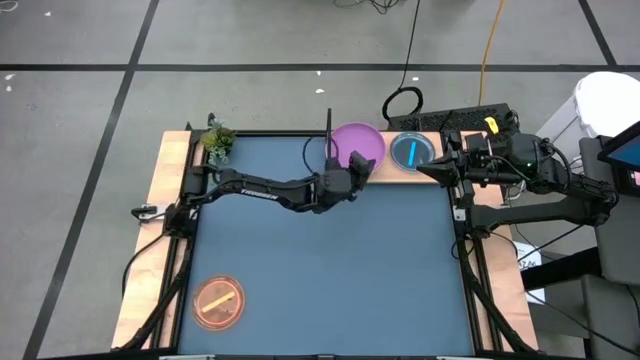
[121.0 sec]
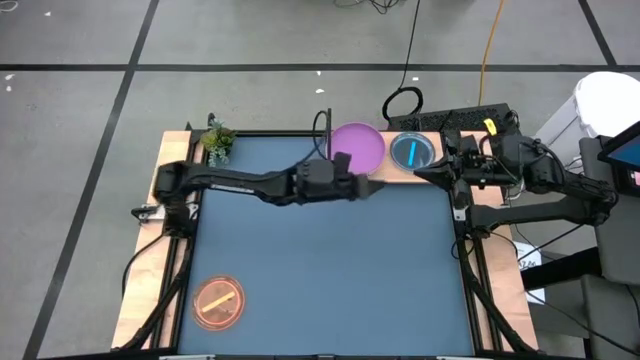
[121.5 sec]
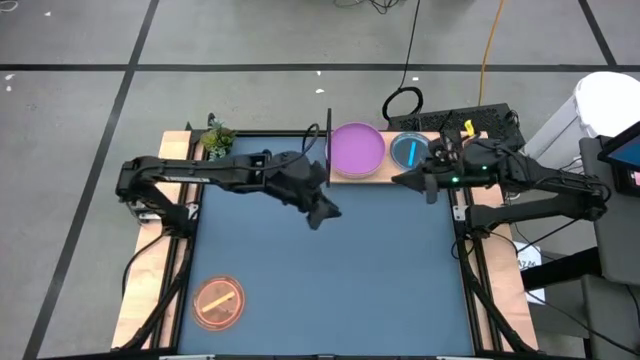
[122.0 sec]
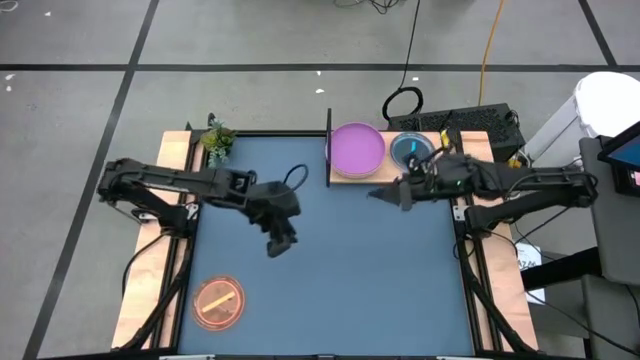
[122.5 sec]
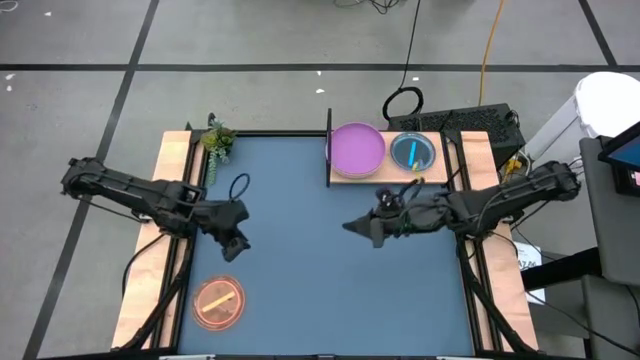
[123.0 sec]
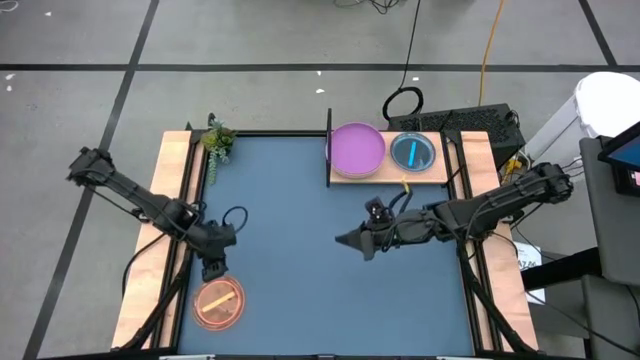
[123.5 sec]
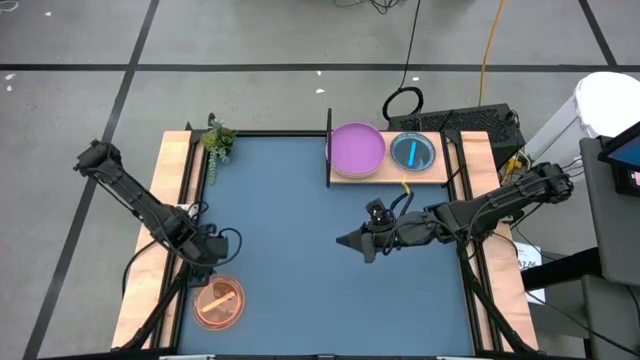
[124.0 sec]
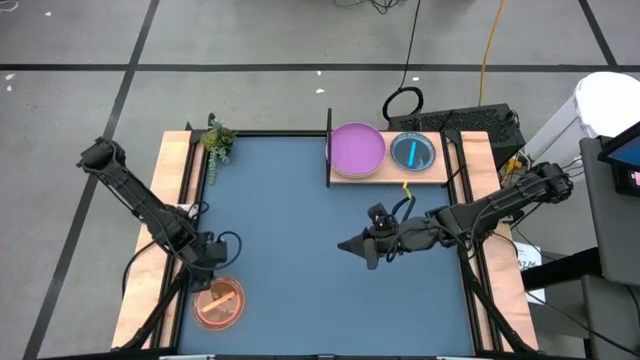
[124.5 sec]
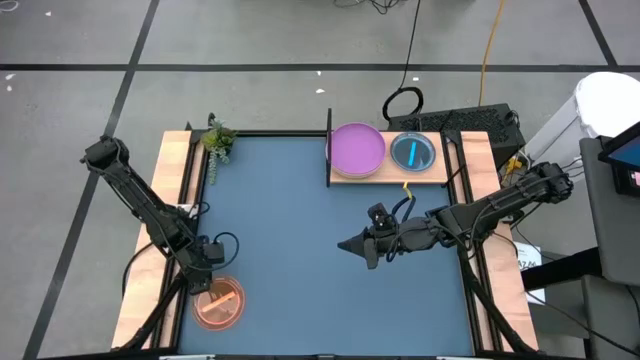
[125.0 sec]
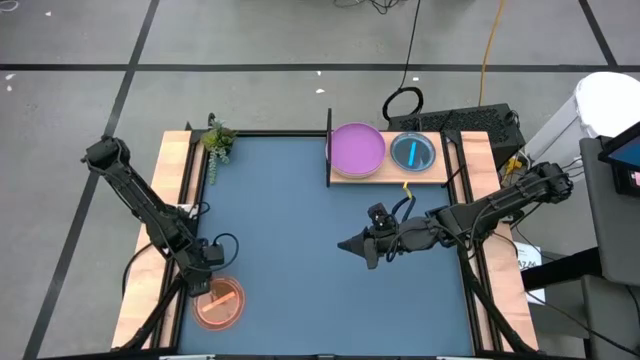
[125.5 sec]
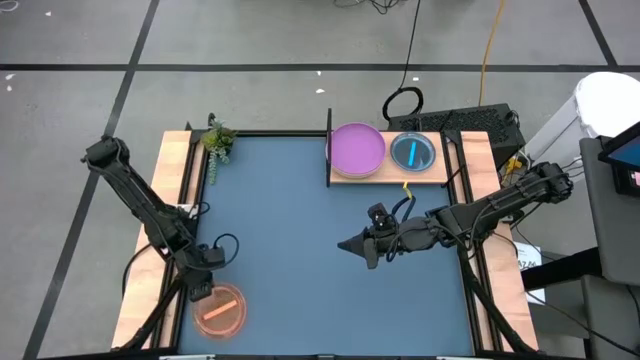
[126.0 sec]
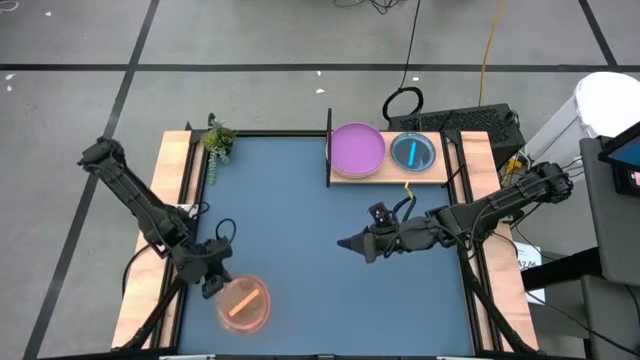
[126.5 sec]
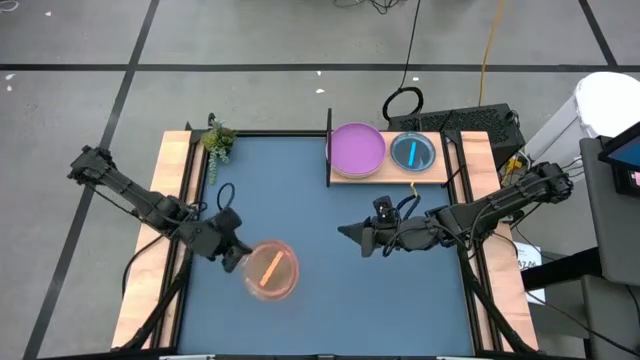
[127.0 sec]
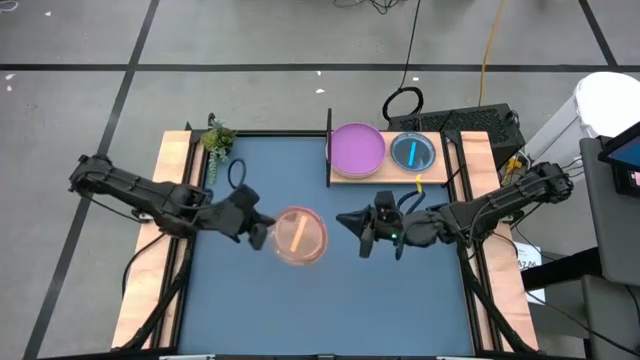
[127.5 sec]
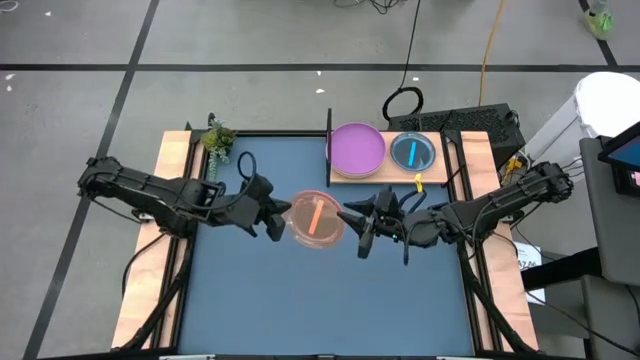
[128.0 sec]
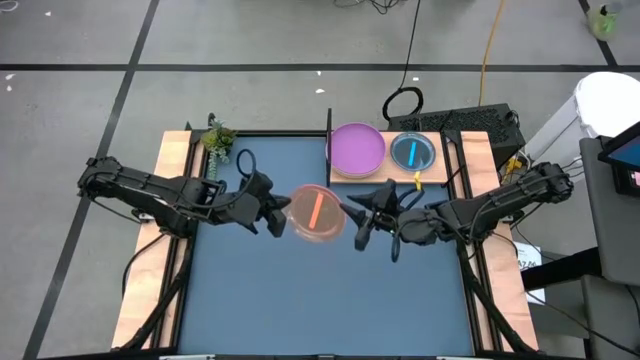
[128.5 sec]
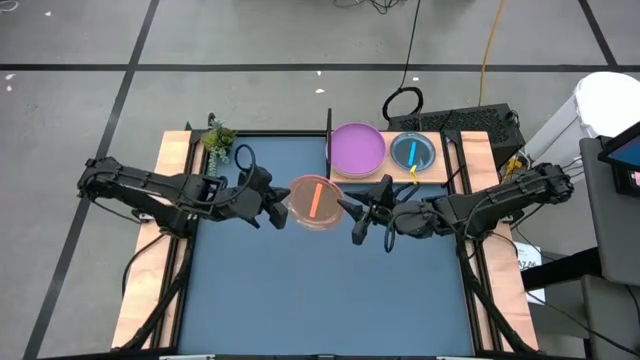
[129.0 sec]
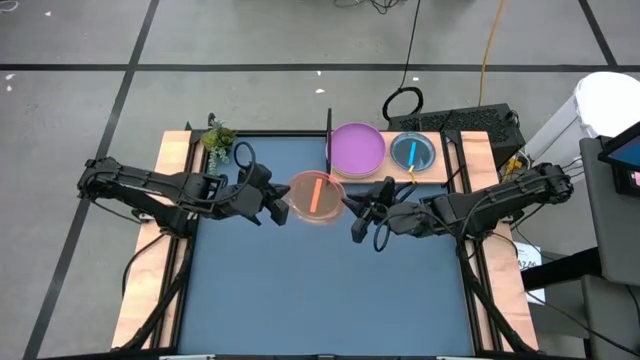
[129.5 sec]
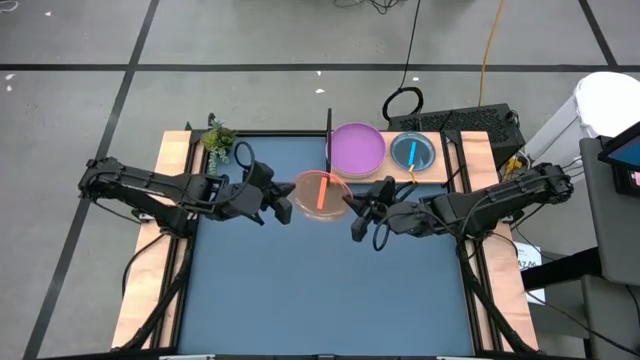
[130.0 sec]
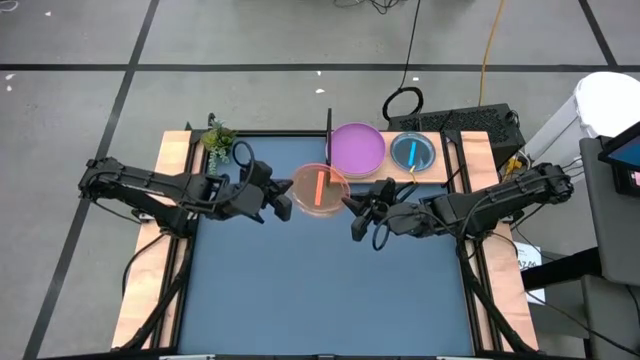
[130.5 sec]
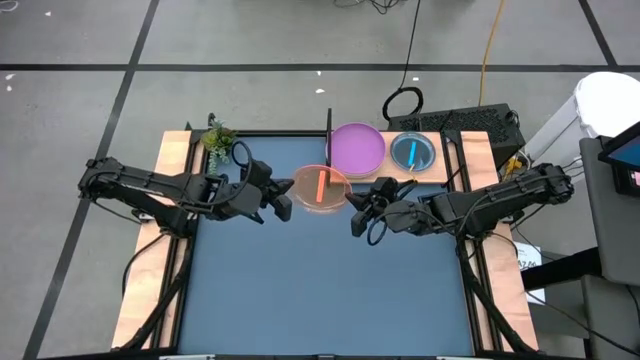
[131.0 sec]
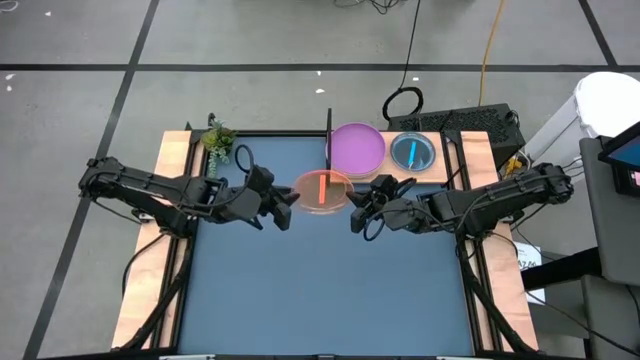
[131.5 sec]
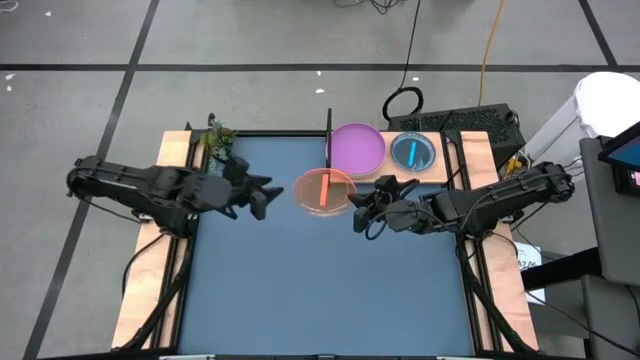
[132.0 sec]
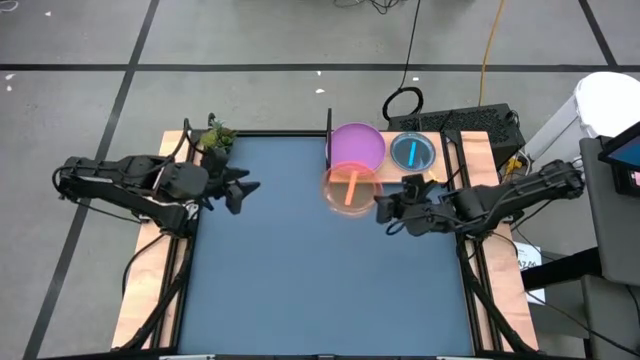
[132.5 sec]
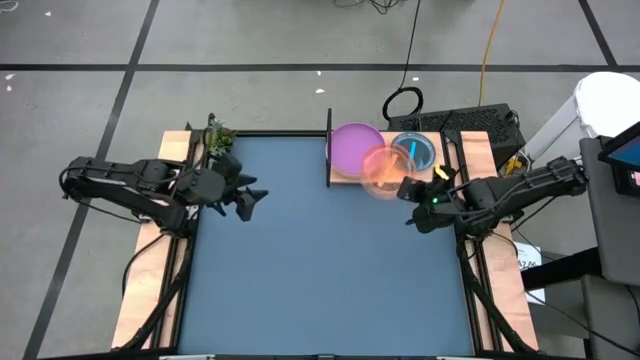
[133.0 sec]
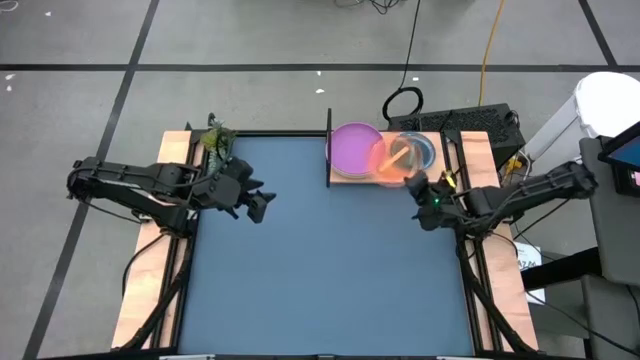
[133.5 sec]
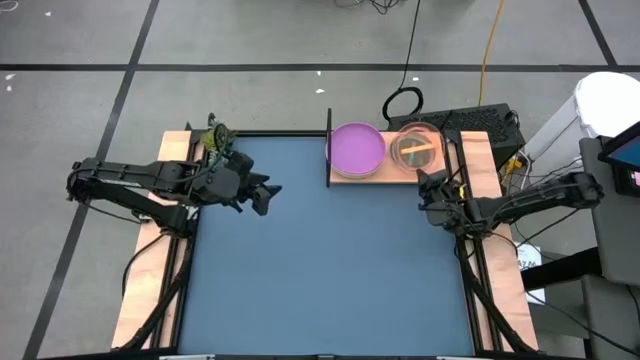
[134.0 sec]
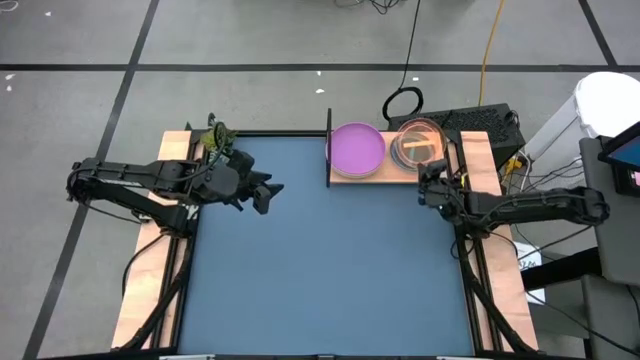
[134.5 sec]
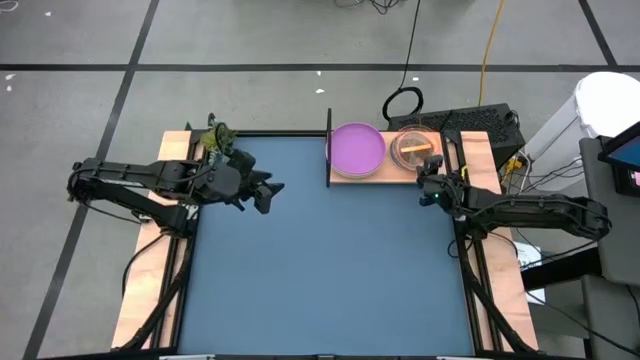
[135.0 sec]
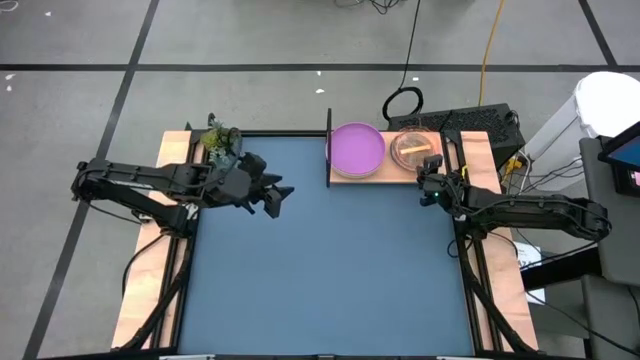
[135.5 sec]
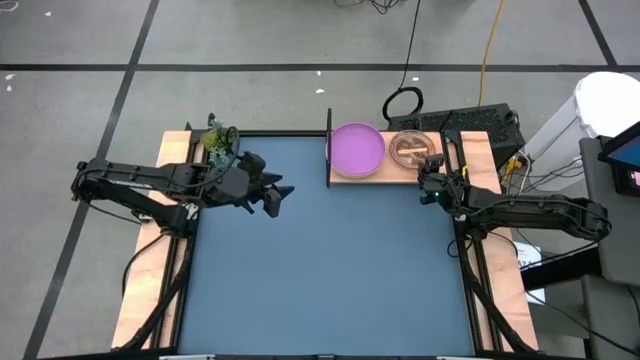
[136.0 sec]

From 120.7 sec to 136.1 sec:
Task: Place and stack plates onto a shelf
Stack the light orange plate on top of the blue plate on the shelf

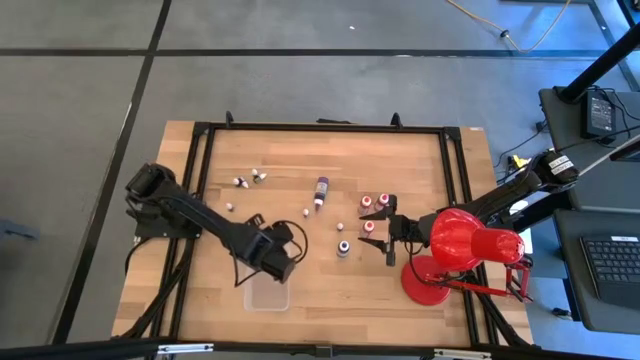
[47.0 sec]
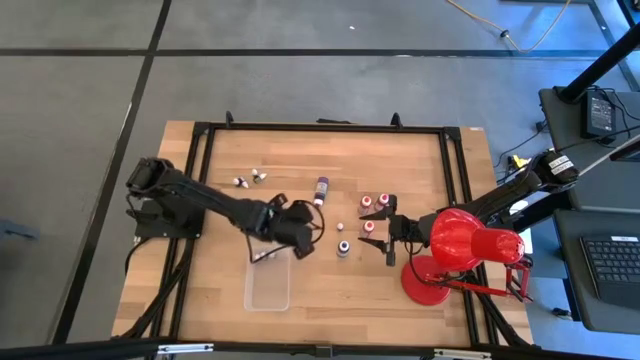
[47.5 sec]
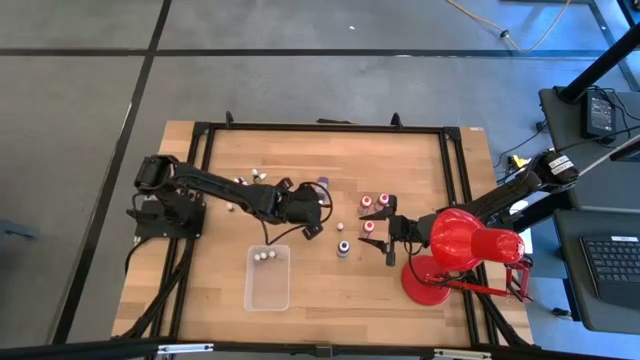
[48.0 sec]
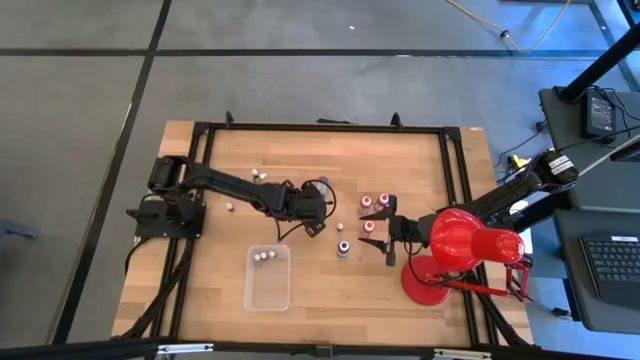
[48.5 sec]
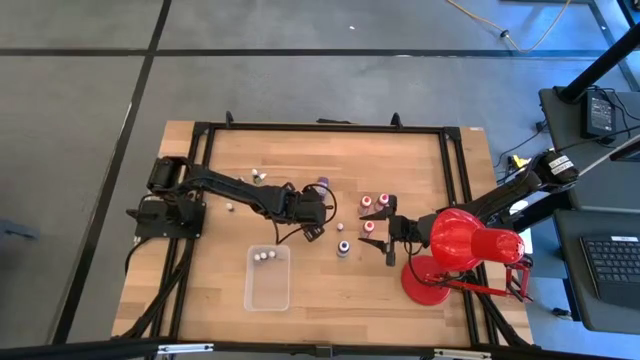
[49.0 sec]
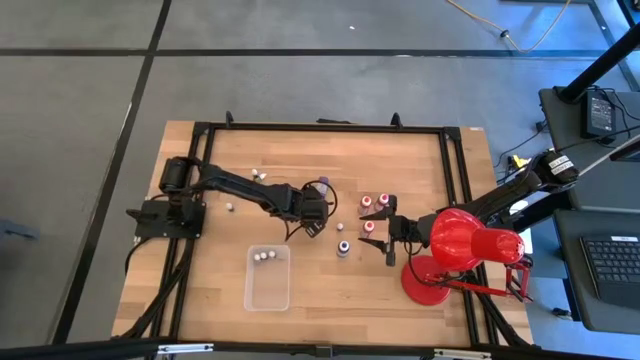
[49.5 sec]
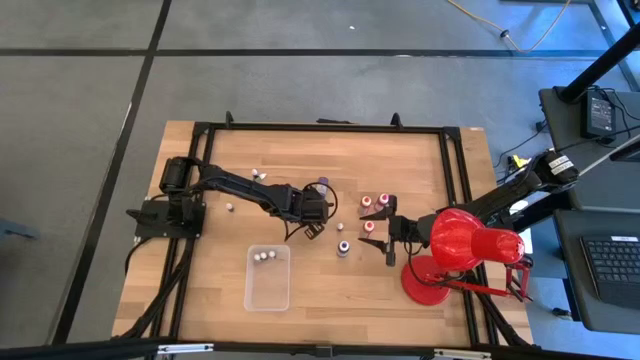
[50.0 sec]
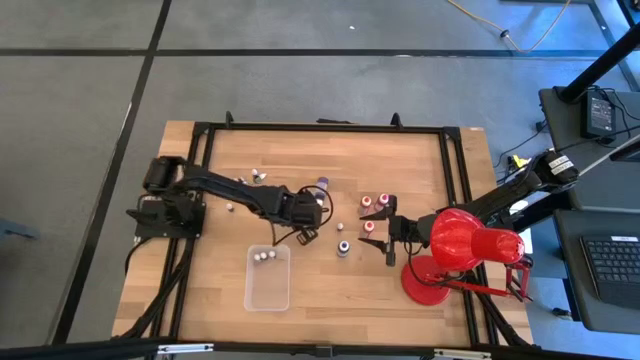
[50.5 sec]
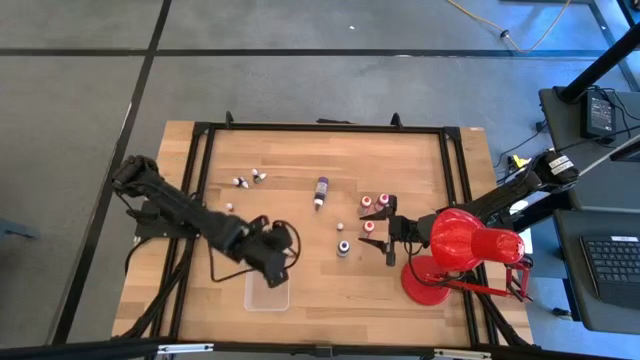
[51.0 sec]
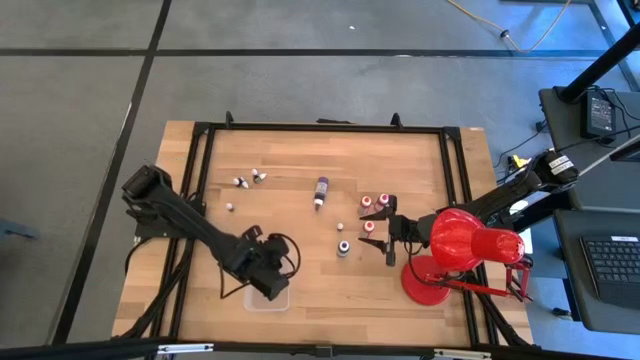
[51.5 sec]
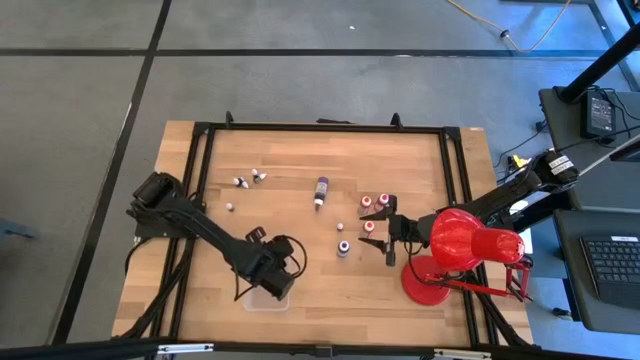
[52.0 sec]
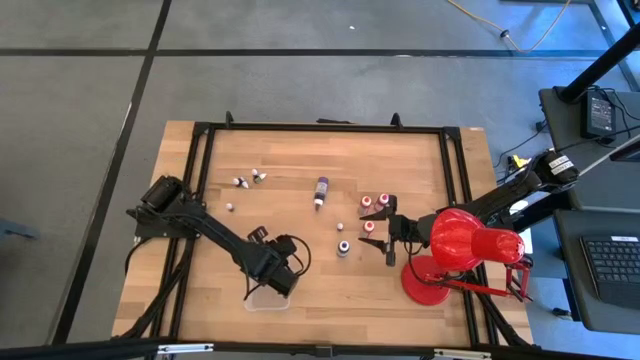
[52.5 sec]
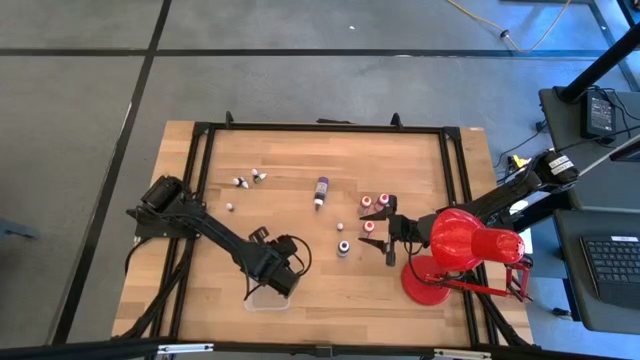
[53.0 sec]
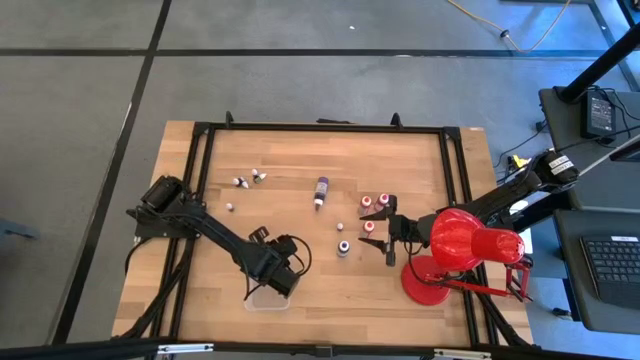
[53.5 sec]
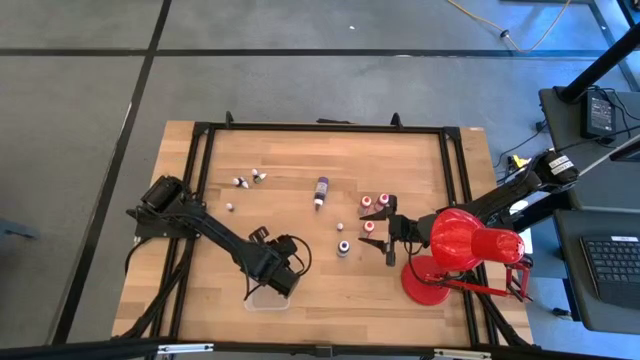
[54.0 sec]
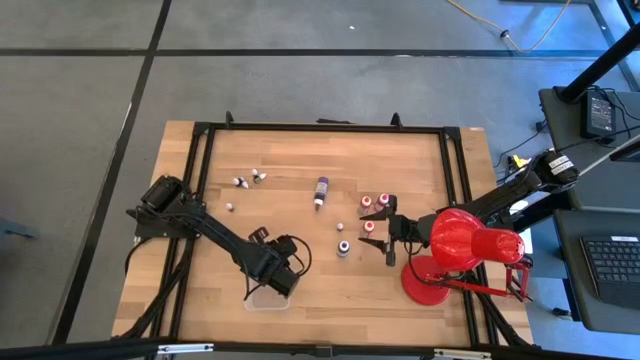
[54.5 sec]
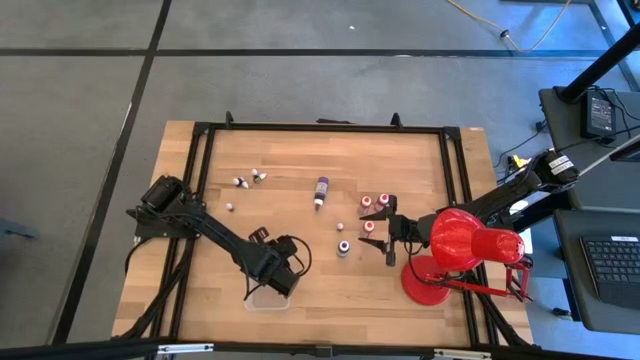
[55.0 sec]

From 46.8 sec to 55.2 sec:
Task: Pick & Place food coloring
Put the small red food coloring bottle into the bin
